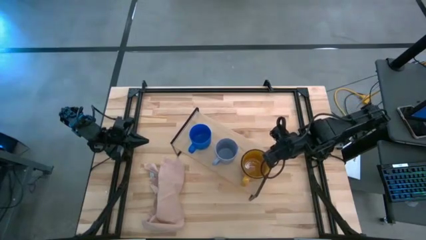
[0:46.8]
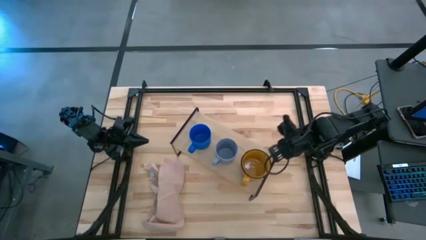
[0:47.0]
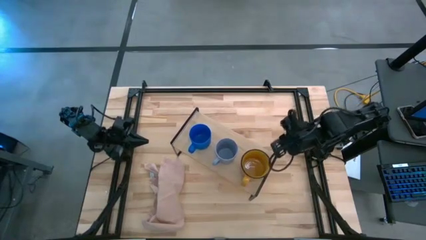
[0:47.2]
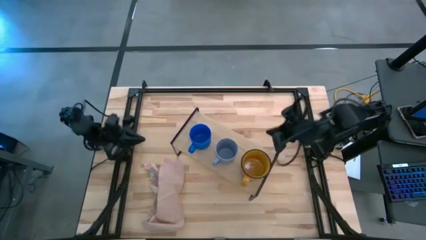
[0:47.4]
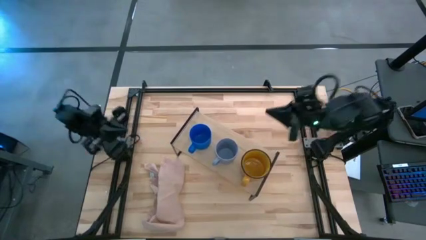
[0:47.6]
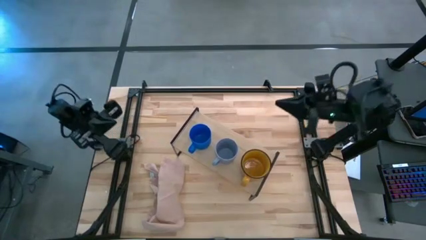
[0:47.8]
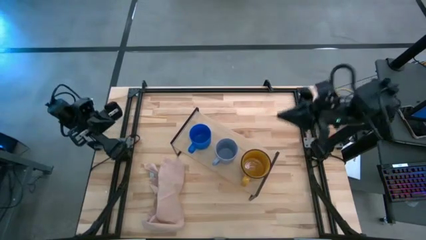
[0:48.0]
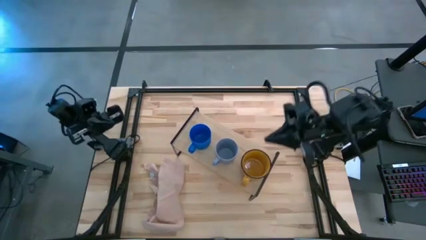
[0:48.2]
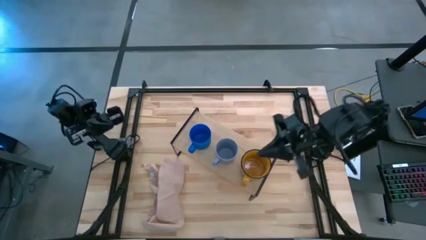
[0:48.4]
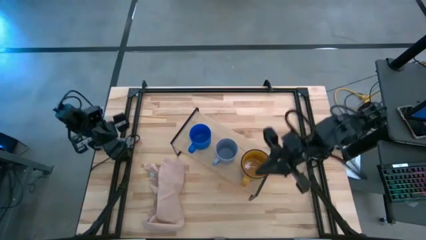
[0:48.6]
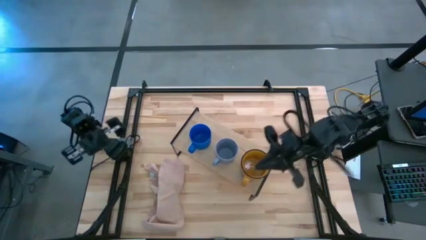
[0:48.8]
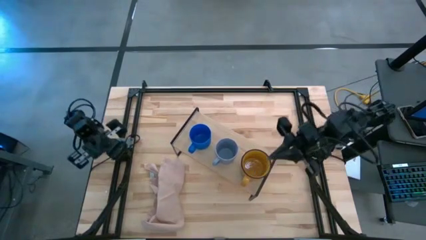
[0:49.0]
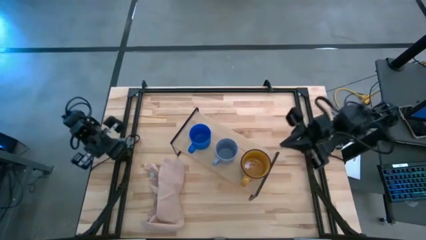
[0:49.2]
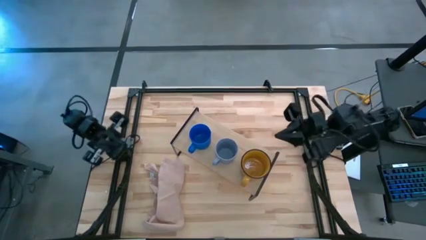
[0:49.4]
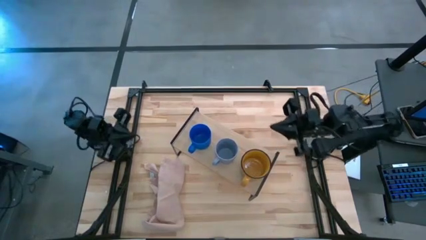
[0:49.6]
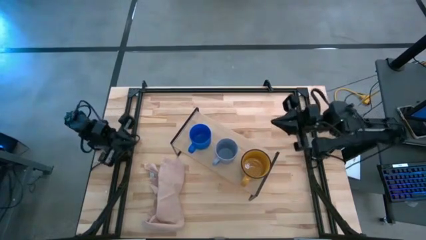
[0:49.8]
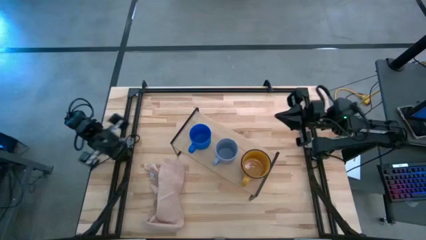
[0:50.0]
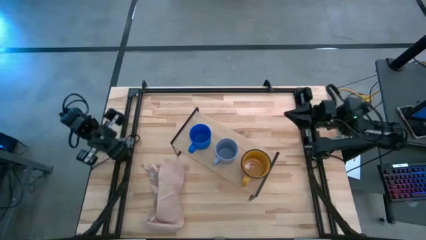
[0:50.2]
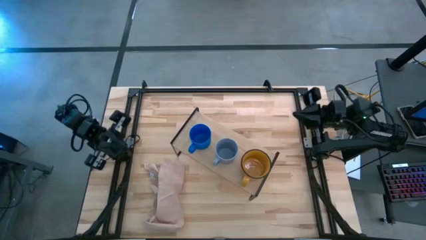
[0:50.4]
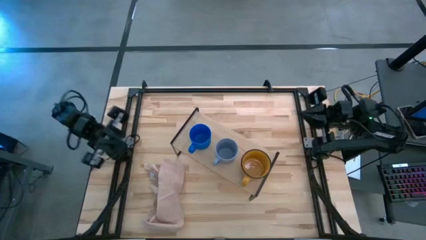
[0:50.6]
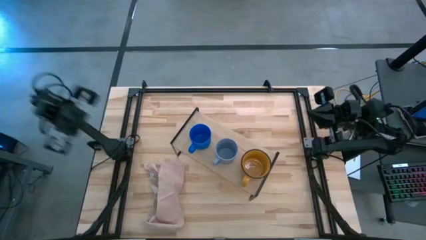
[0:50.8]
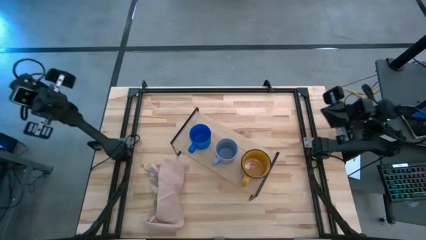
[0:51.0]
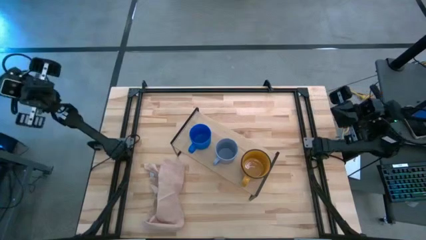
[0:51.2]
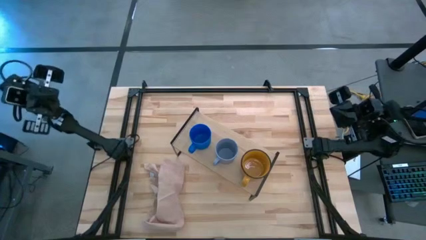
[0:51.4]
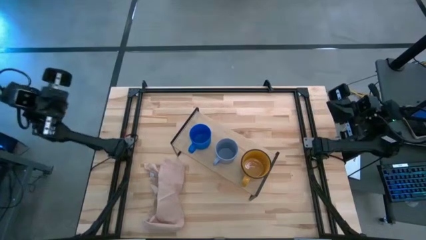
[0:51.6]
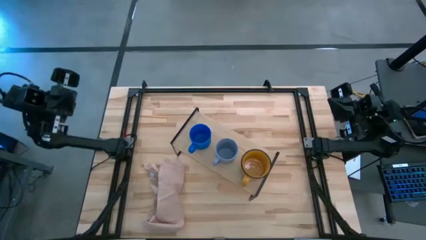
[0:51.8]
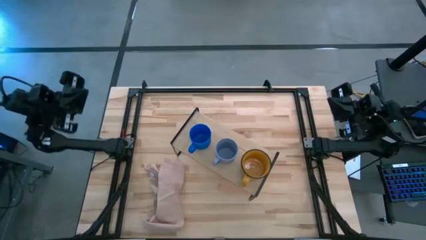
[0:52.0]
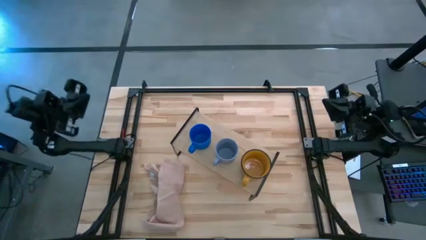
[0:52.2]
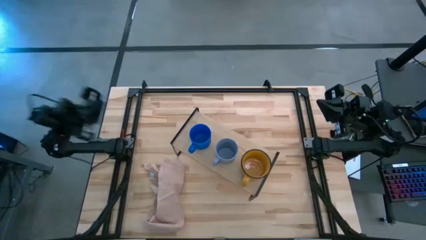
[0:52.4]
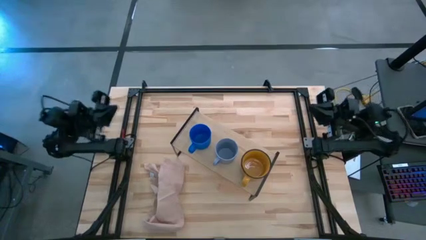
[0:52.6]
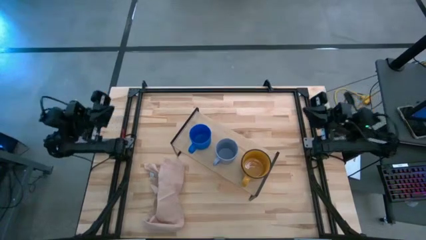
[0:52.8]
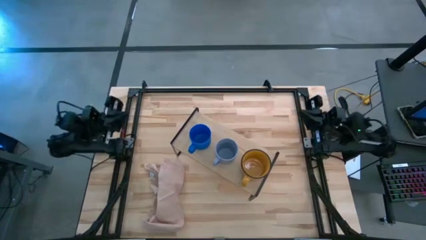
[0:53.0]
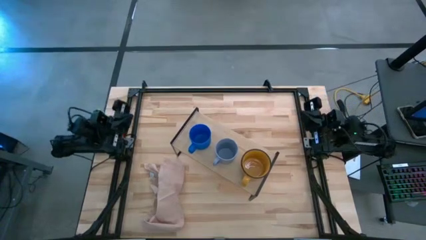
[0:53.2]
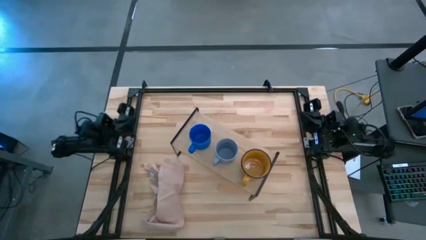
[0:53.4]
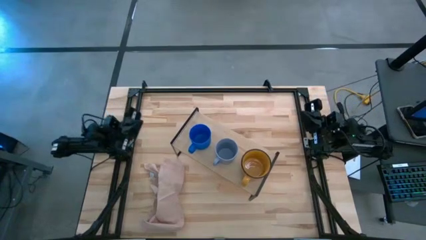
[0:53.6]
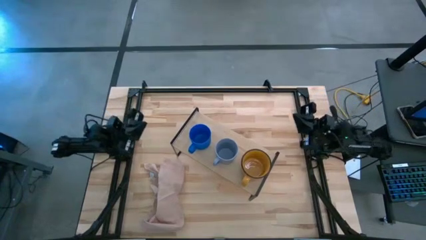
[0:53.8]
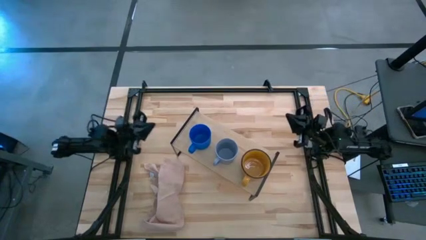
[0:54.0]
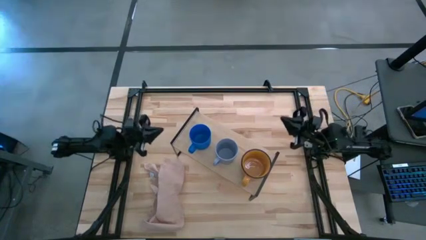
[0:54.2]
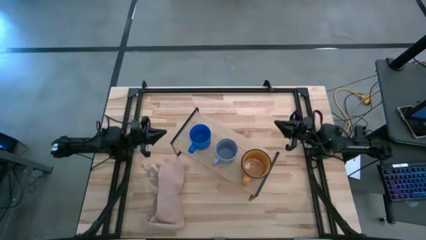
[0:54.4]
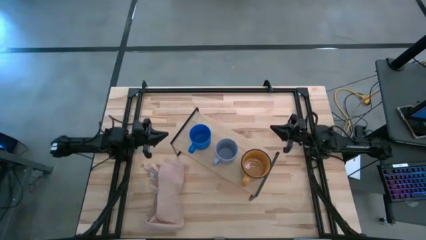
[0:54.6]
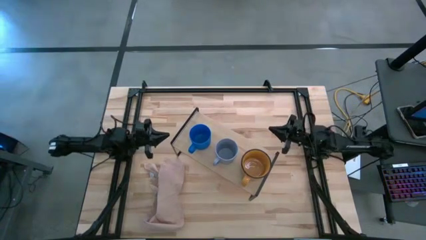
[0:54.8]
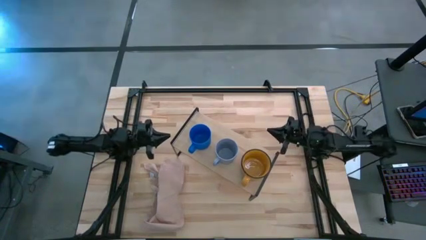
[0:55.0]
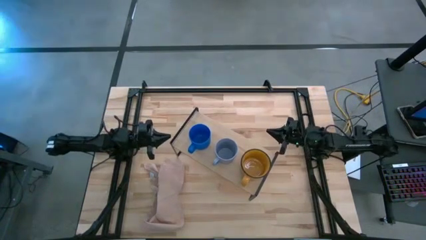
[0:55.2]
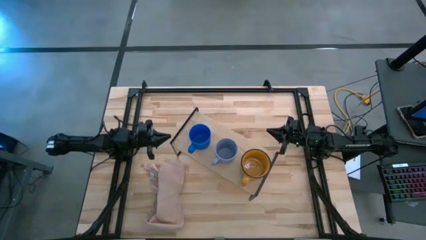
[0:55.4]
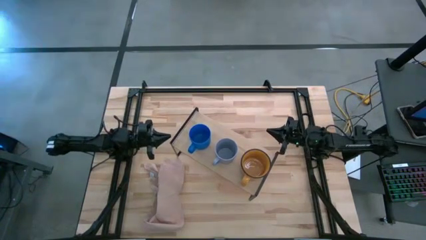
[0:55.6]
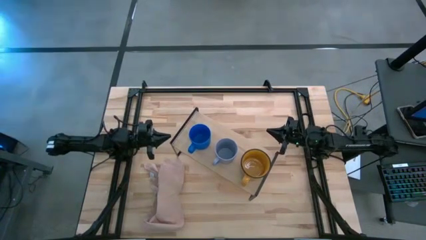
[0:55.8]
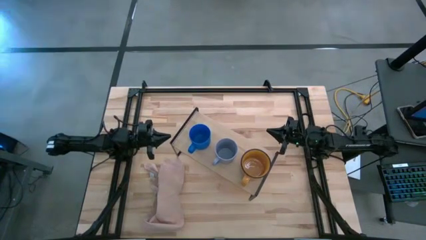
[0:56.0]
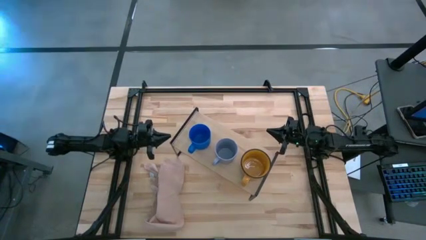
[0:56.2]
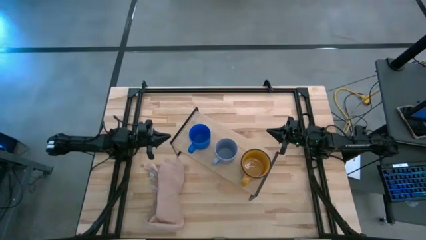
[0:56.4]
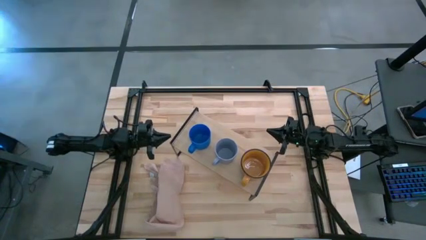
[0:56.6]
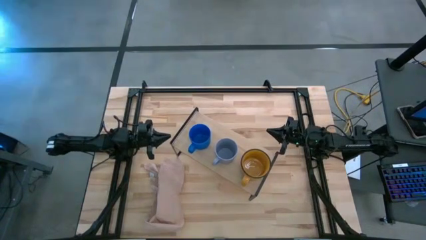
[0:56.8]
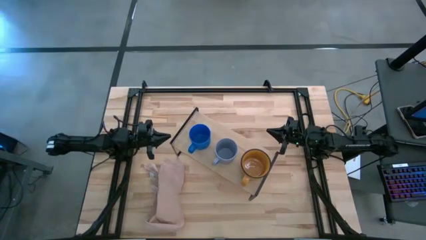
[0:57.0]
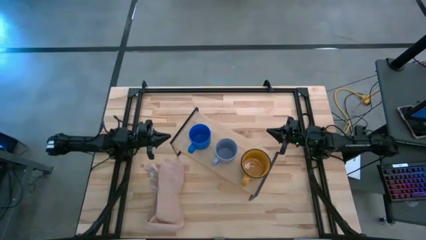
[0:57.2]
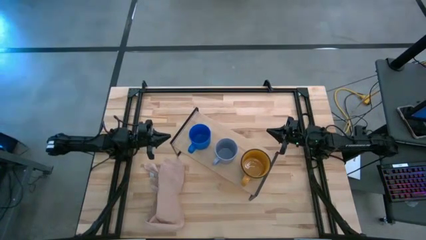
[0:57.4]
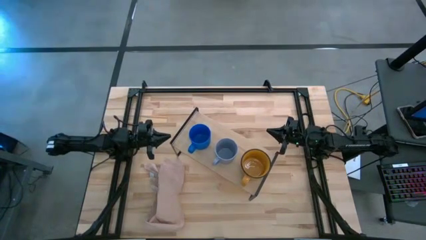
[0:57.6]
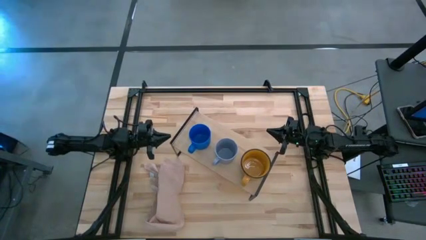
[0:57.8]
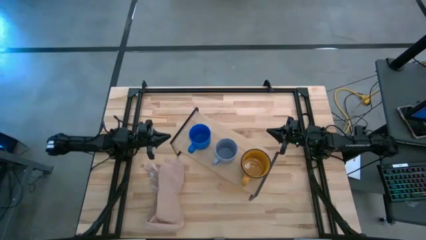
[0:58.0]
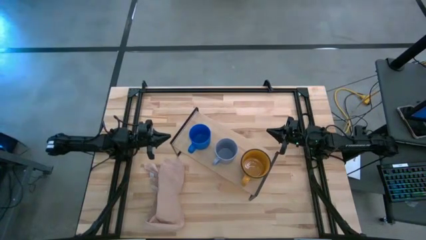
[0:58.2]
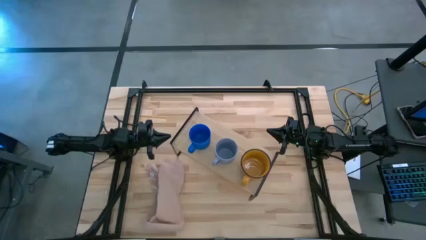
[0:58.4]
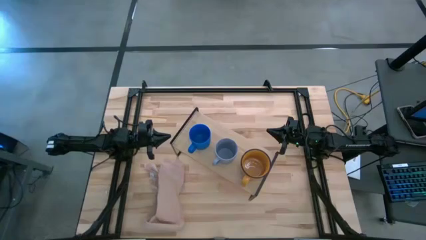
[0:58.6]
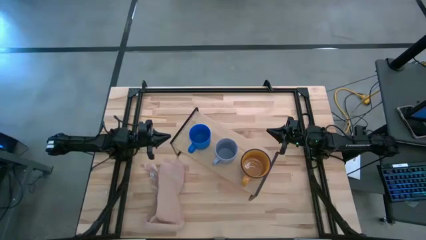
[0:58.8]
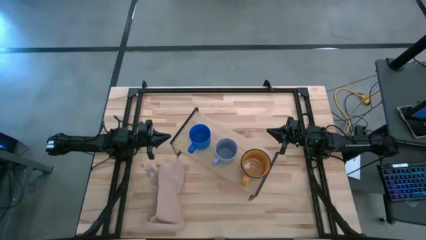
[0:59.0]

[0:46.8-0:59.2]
Task: Stack small to large cups/mugs on shelf
Return to Home Position

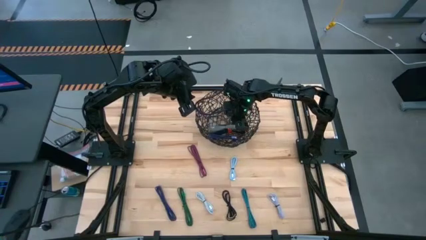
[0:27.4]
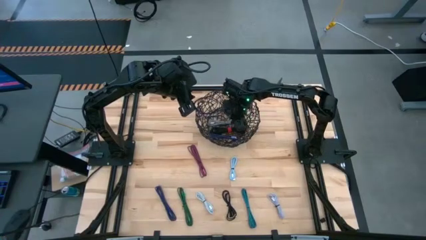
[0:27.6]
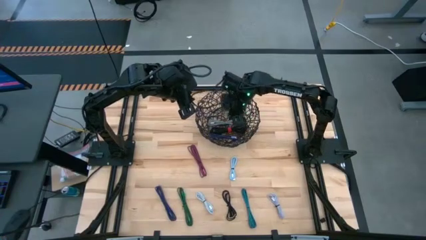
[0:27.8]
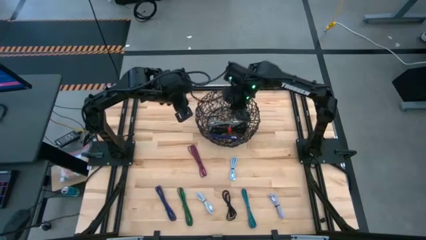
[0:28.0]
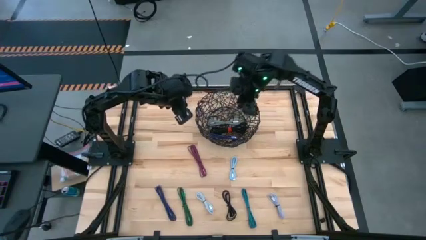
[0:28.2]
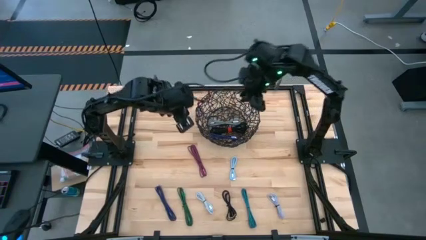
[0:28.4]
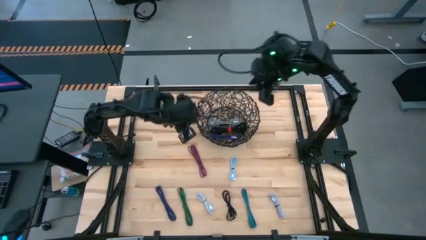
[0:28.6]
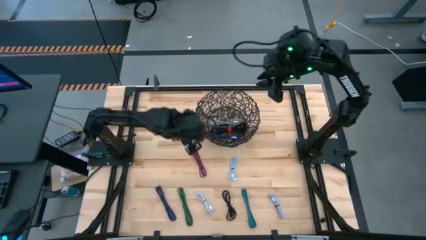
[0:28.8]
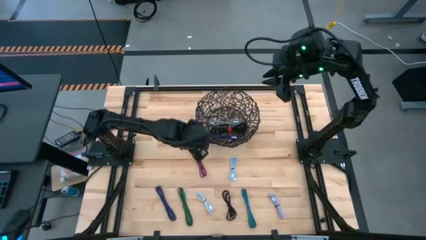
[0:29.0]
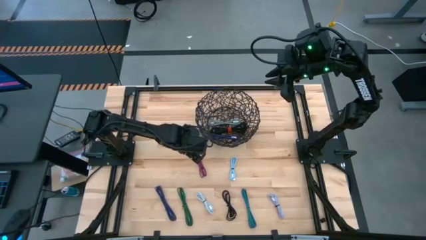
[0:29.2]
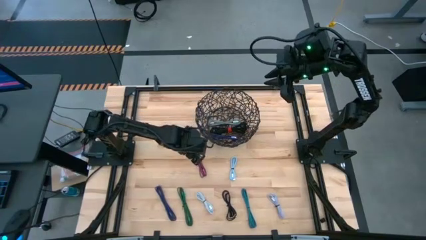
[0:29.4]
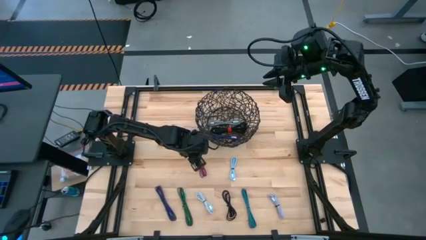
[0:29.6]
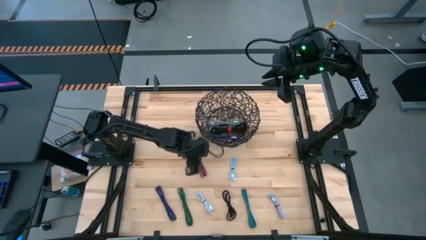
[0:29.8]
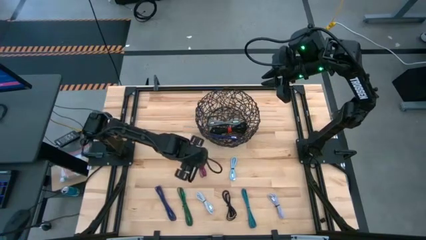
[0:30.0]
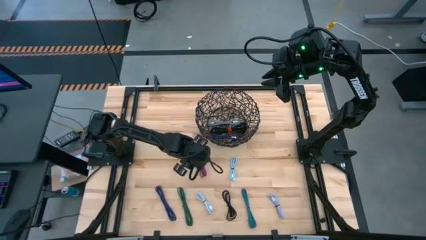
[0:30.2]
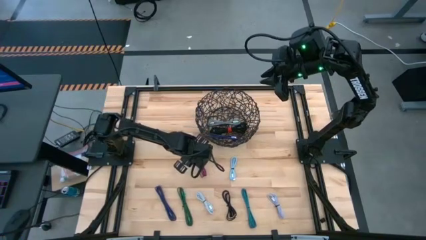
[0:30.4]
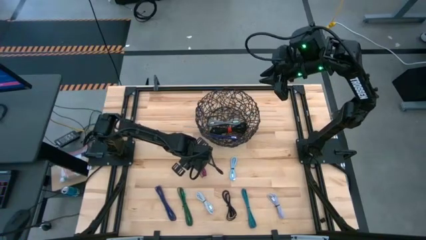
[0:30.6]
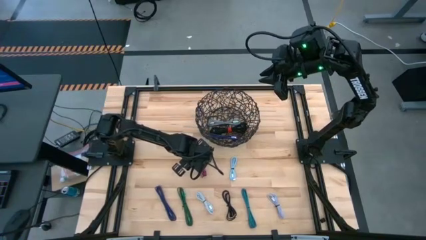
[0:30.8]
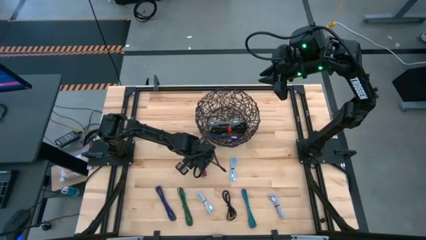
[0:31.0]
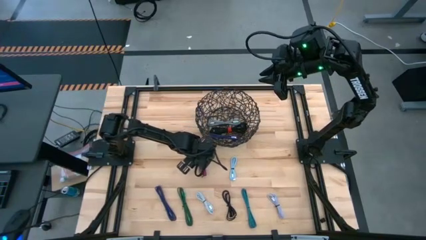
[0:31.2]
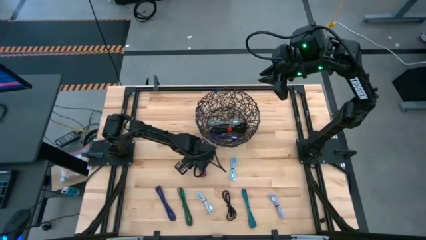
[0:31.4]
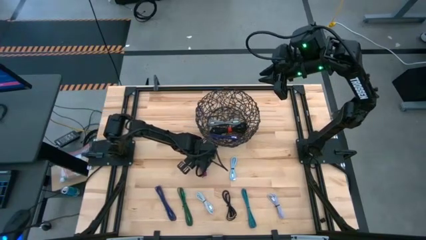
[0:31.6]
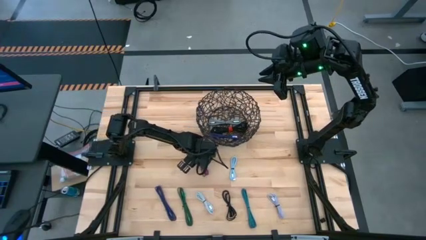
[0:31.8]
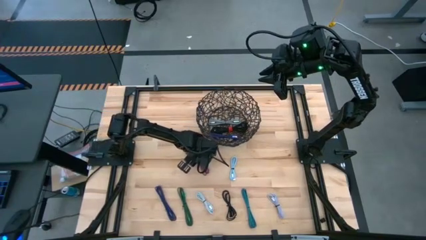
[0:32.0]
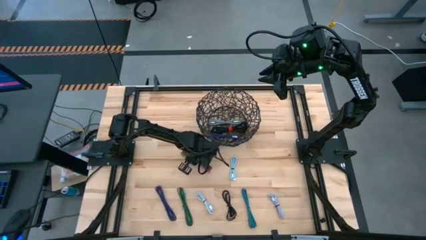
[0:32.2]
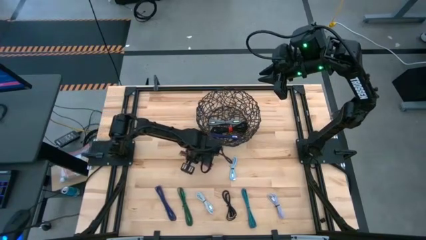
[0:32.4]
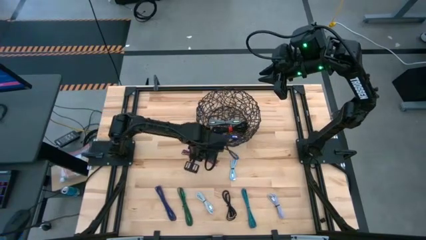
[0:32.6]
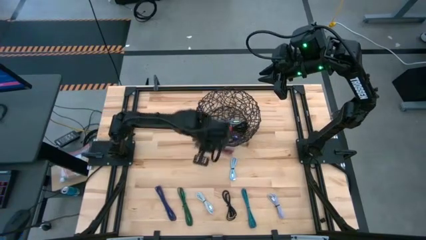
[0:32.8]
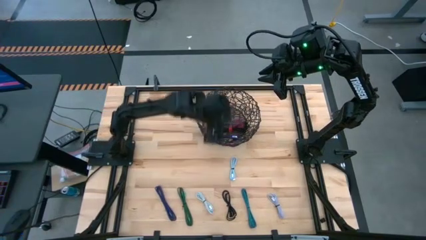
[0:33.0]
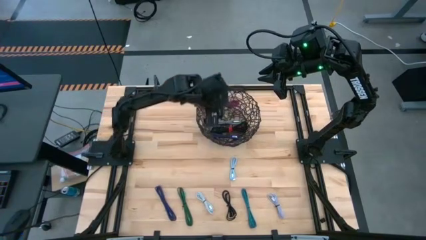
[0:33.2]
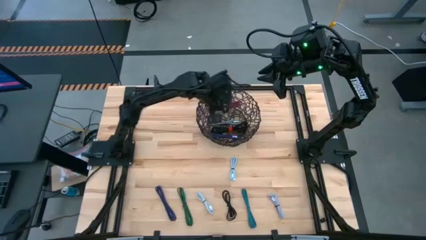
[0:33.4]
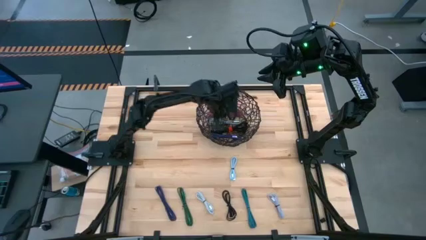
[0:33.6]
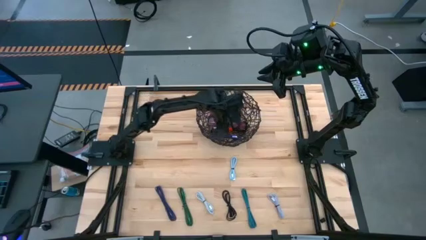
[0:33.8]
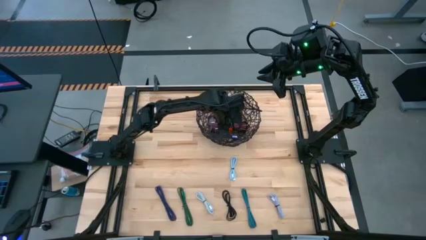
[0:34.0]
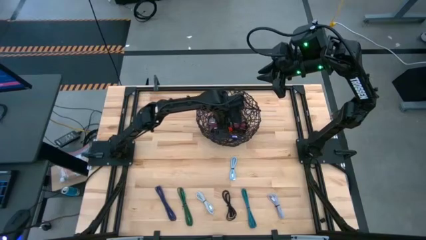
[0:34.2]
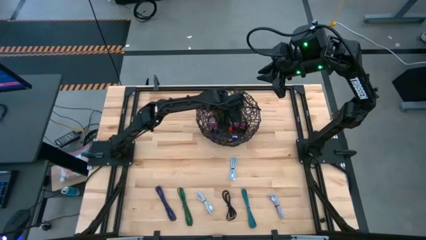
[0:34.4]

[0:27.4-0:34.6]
Task: Pick and place USB-C Cables
Put the purple charger cable into the black mesh basket
